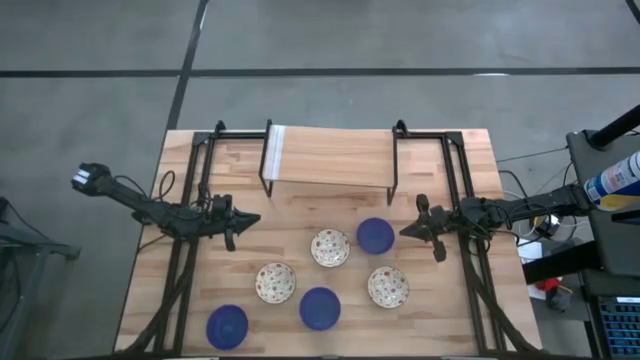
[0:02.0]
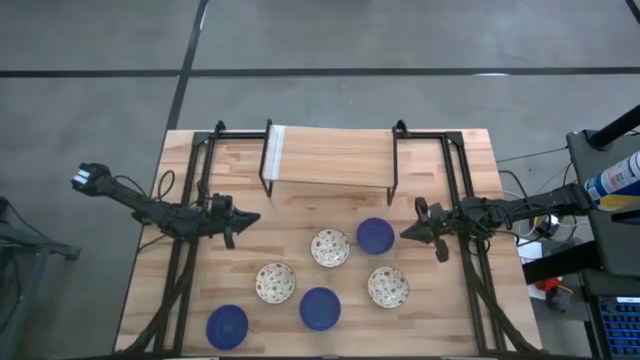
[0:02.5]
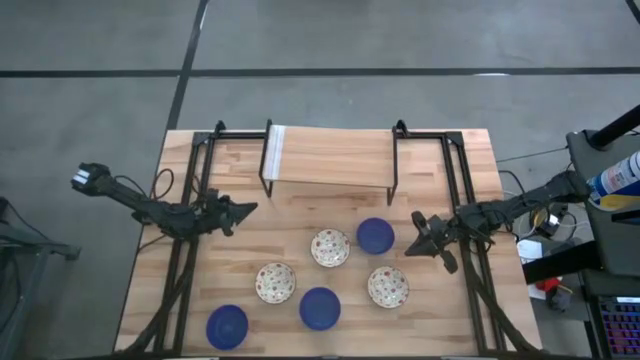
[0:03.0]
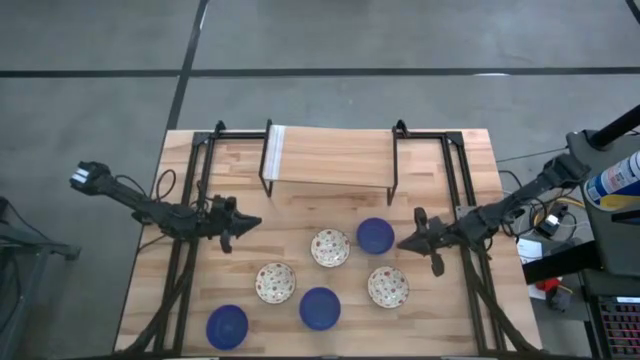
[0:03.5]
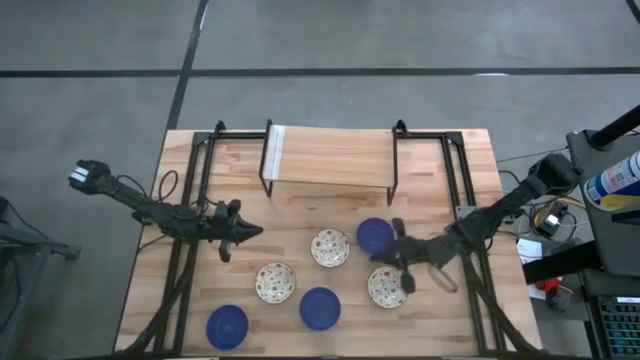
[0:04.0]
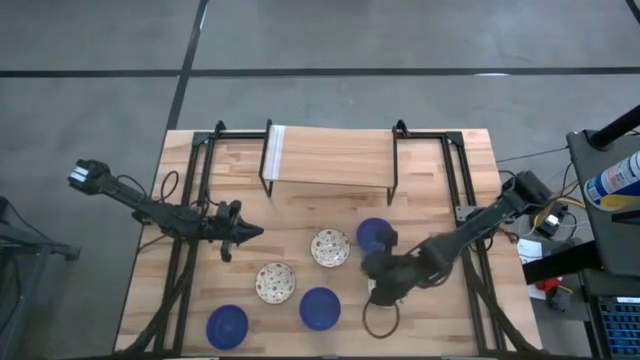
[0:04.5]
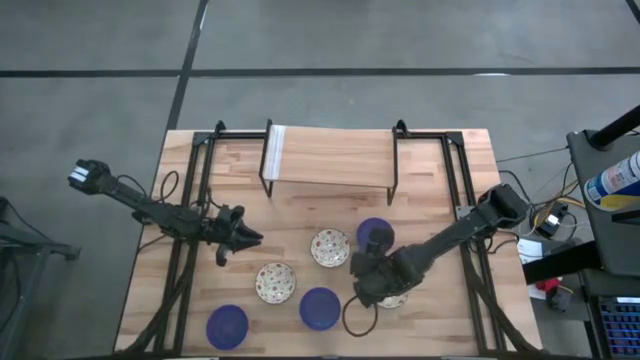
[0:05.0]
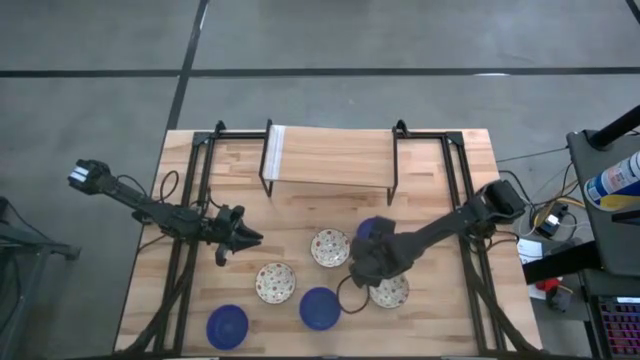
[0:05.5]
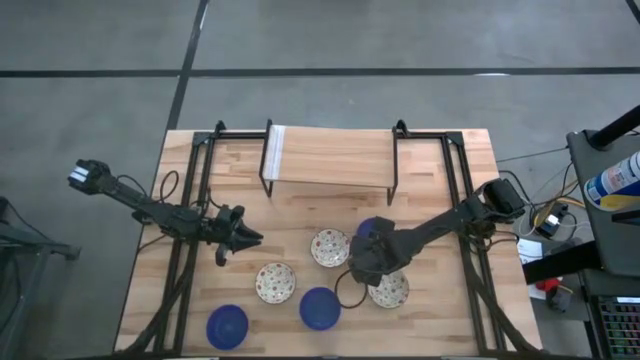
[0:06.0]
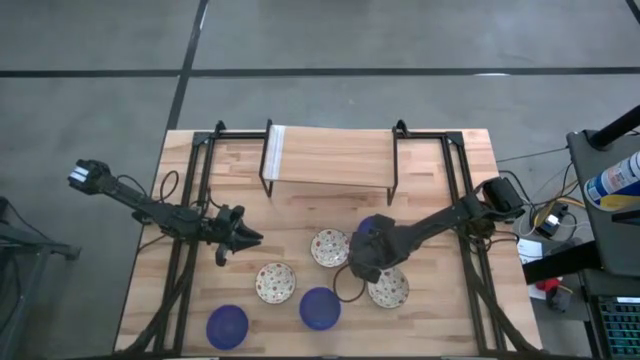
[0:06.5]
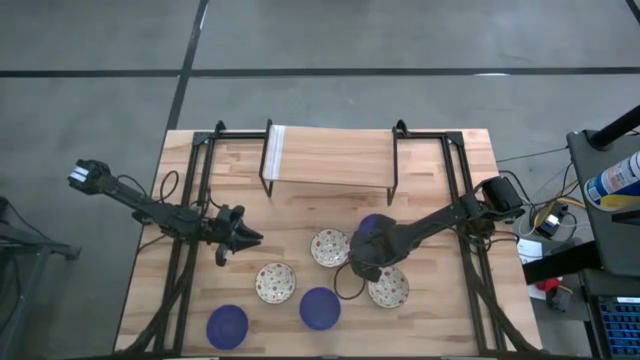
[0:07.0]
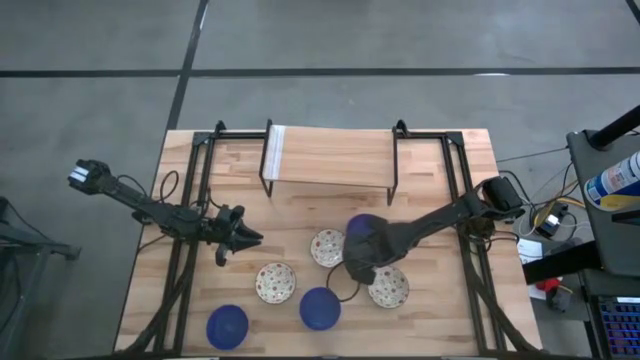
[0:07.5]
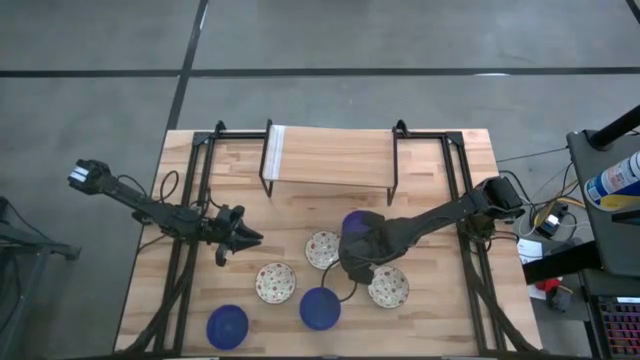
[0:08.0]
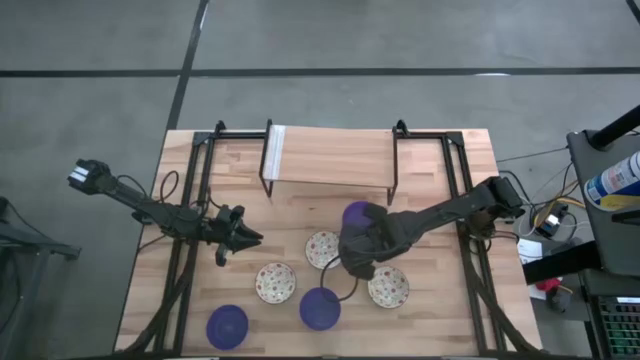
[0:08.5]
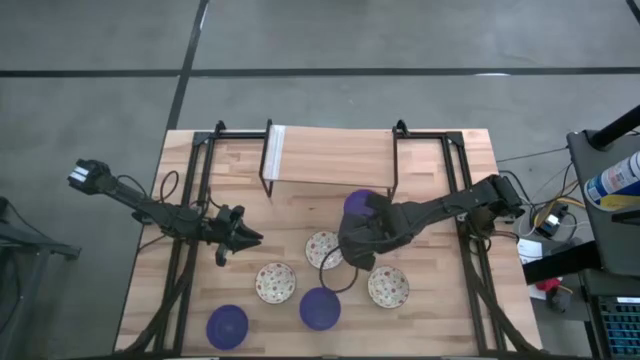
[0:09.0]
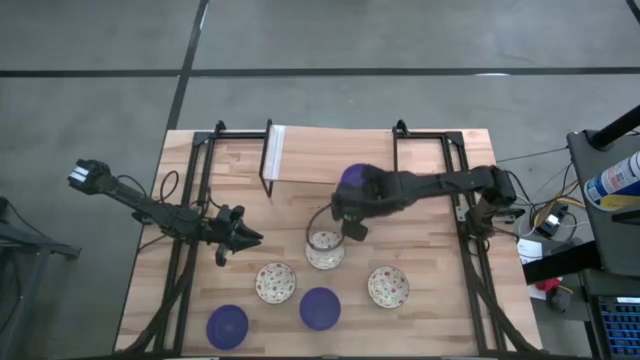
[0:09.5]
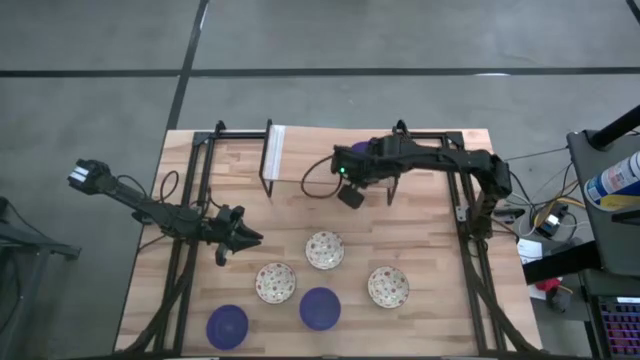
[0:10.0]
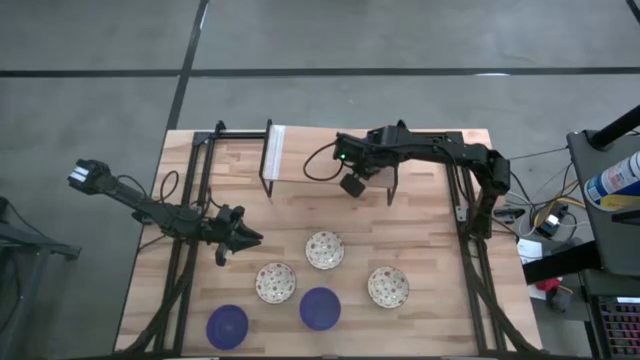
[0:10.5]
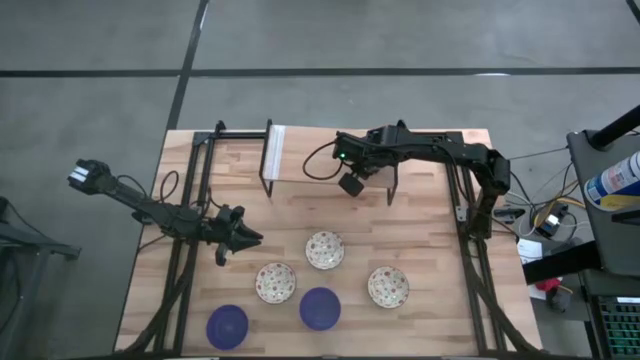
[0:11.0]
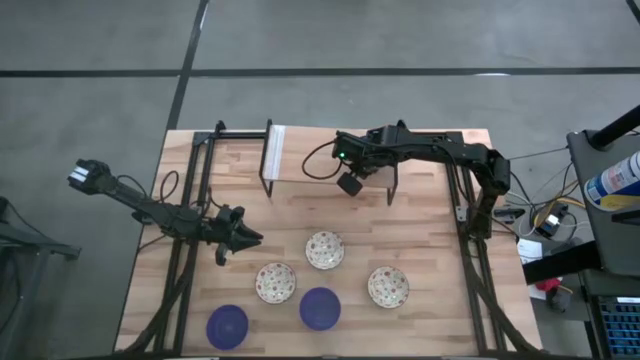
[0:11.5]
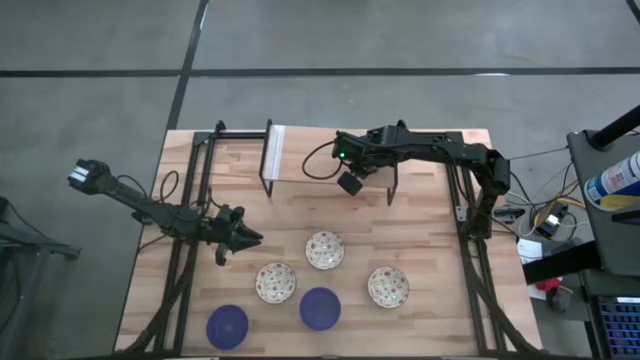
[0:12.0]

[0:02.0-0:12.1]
Task: Pick & Place Mini bowls
Put the top blue bowl on the shelf

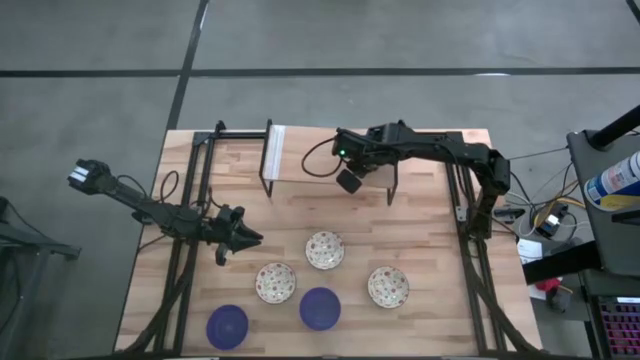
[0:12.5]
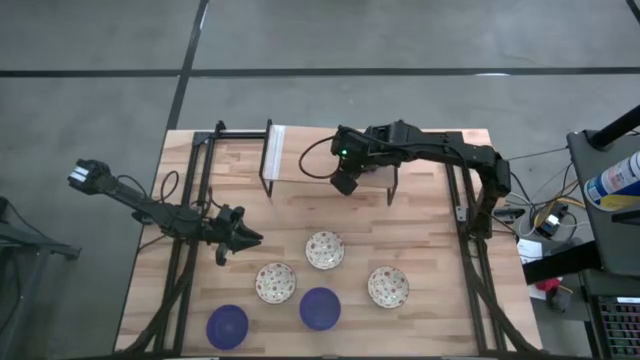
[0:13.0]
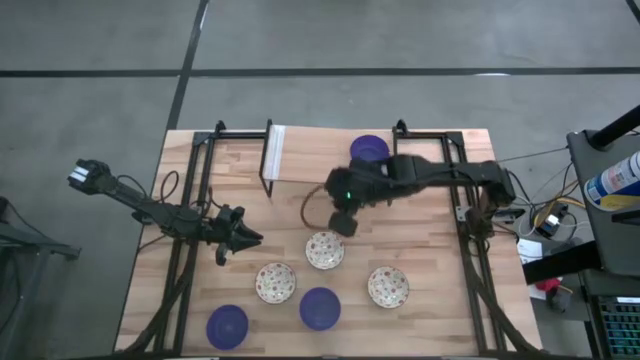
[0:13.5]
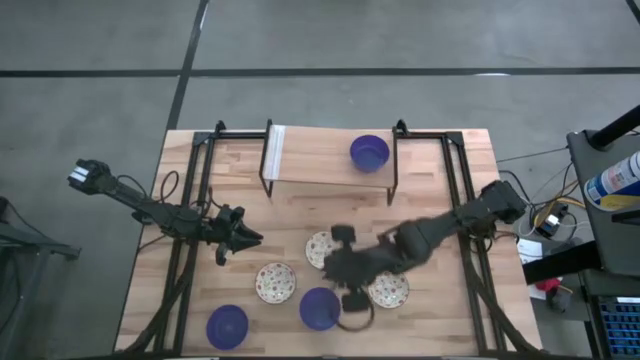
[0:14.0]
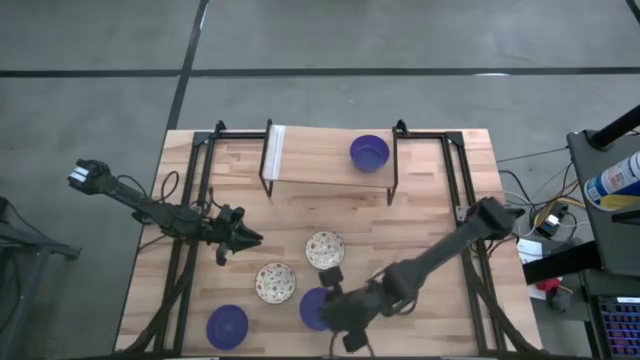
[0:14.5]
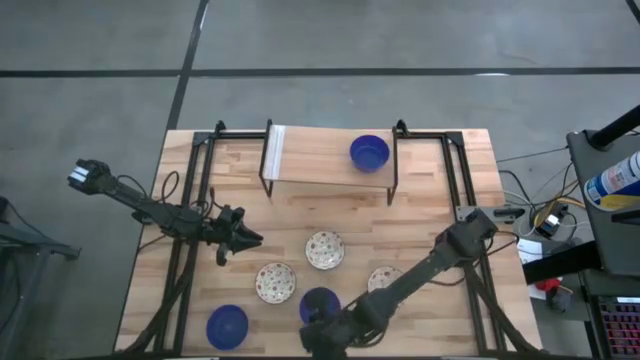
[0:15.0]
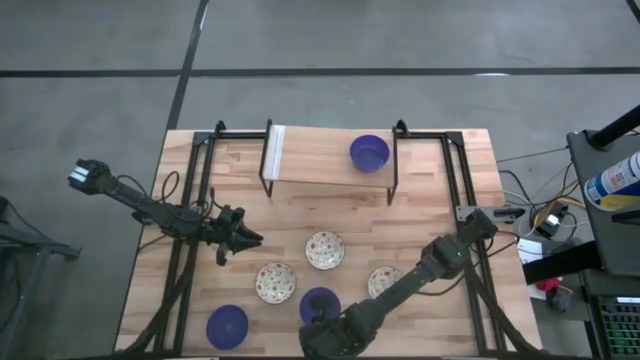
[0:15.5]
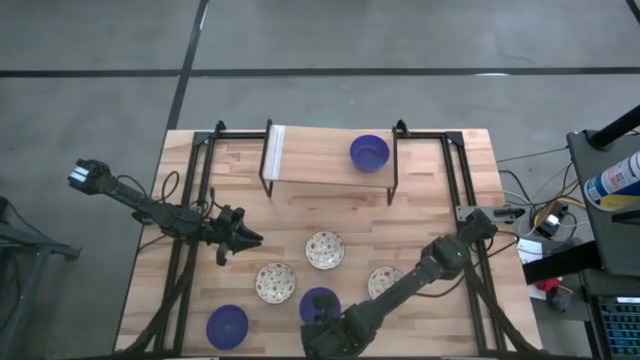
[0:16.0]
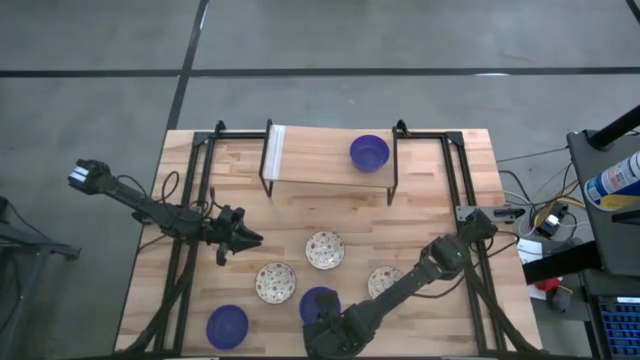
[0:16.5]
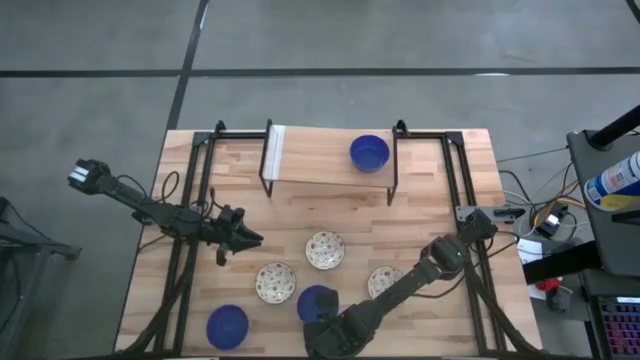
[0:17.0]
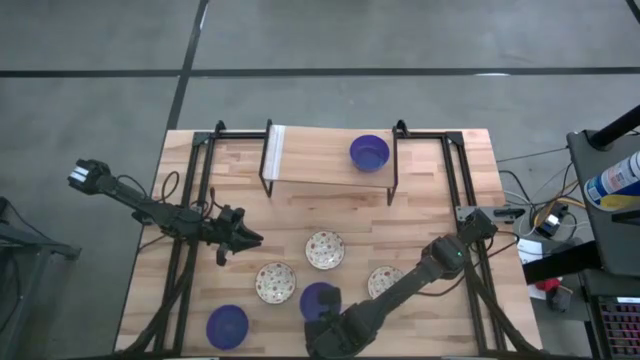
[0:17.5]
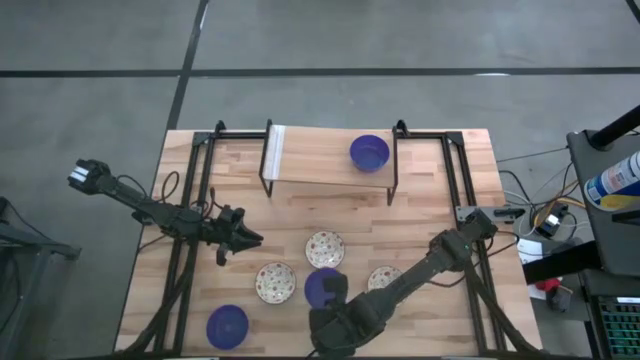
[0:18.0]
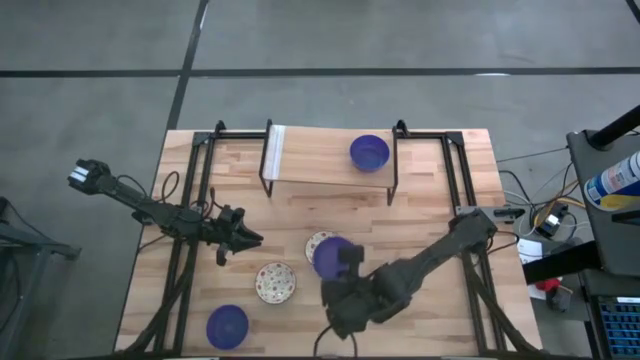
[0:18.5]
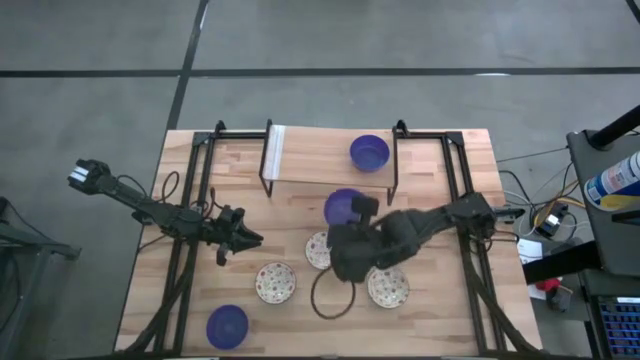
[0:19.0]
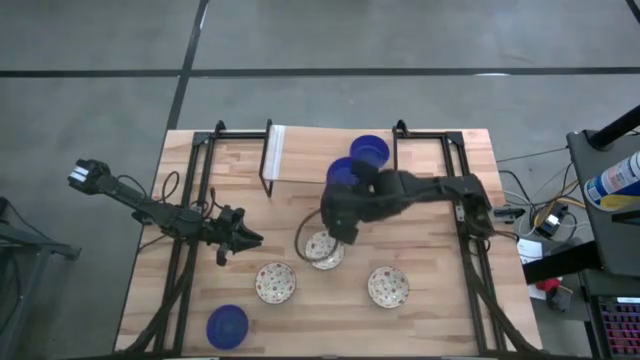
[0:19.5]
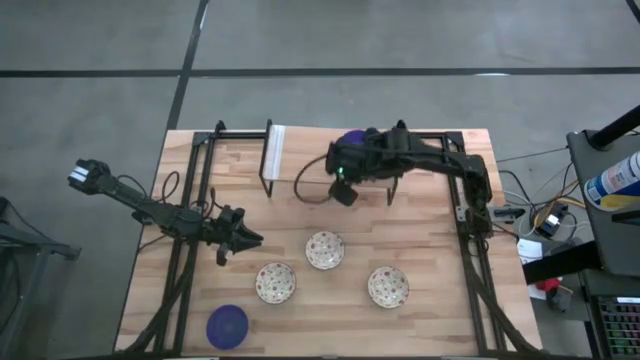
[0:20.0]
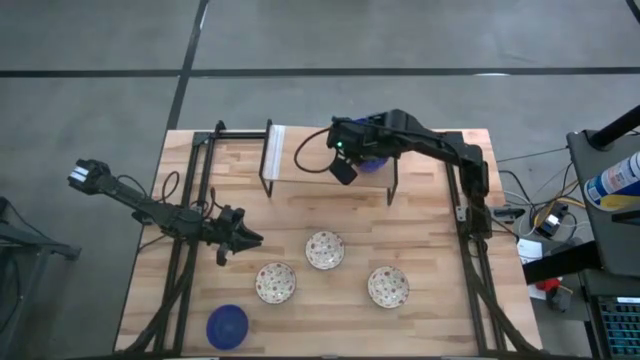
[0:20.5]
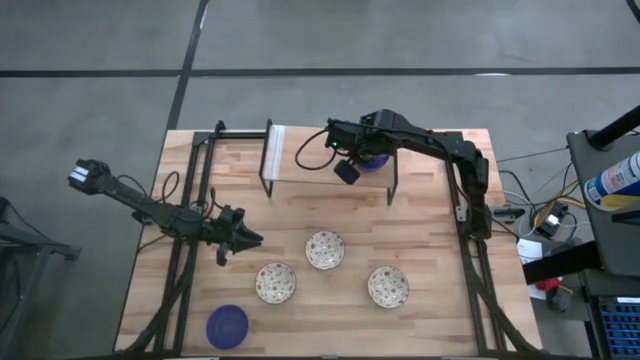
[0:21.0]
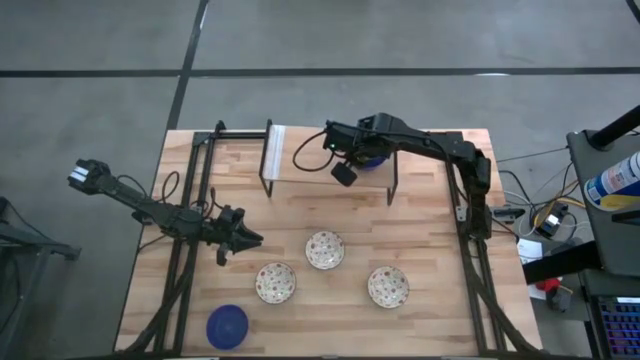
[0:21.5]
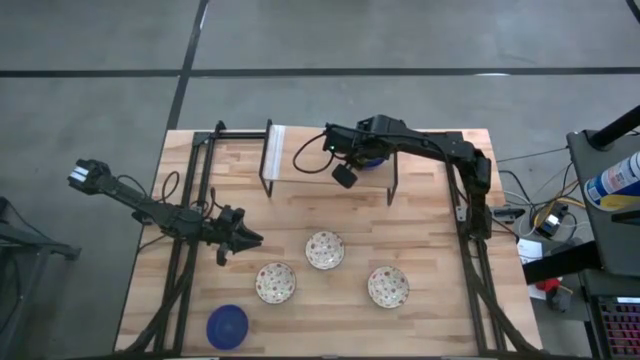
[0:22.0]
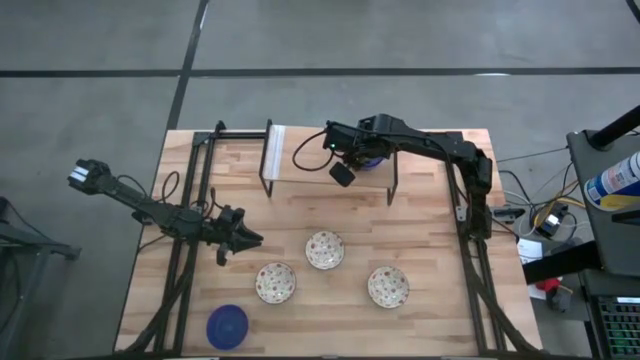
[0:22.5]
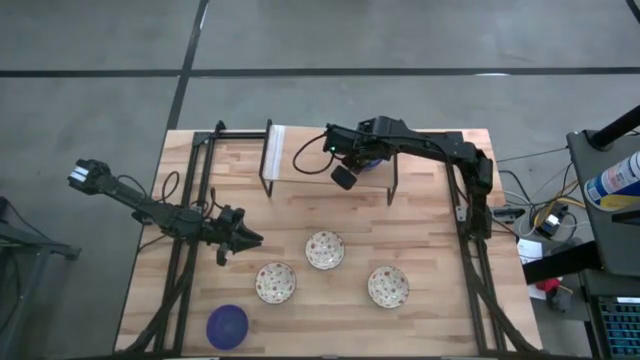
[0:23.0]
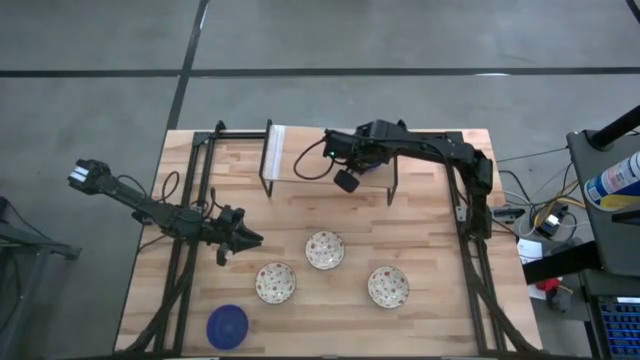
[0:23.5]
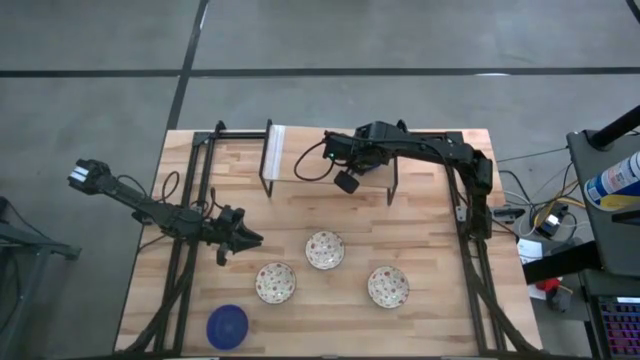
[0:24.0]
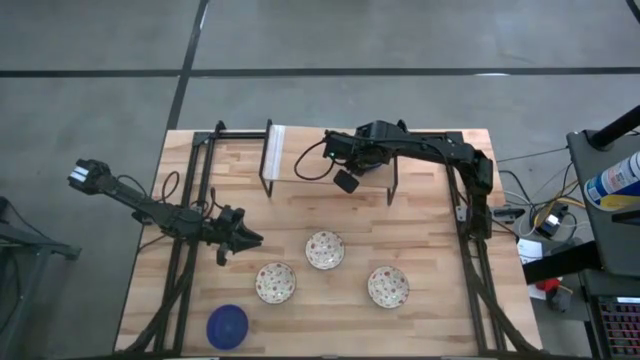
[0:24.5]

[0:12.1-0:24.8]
Stack the right blue bowl on the blue bowl on the shelf
